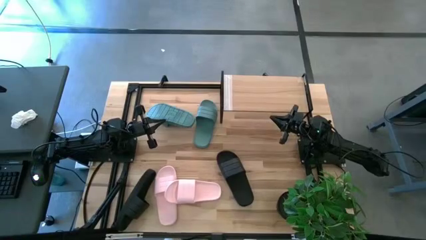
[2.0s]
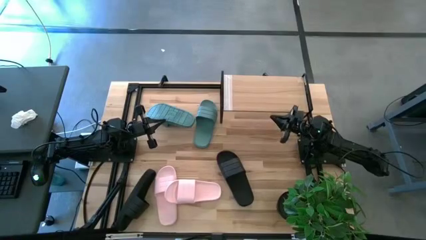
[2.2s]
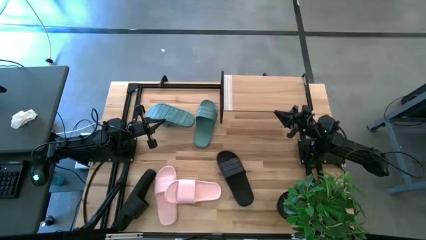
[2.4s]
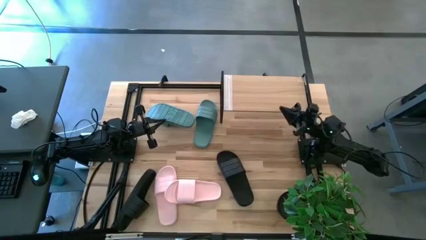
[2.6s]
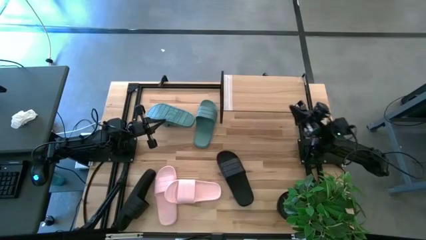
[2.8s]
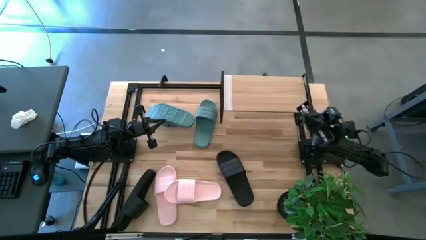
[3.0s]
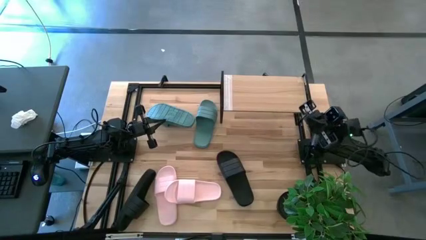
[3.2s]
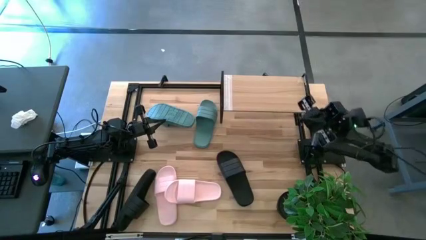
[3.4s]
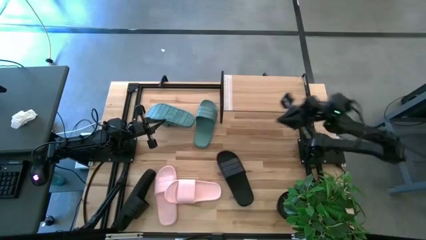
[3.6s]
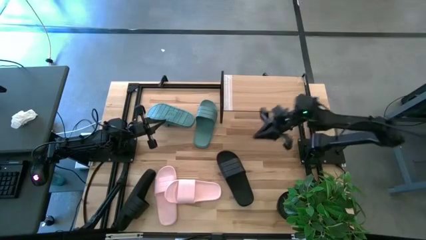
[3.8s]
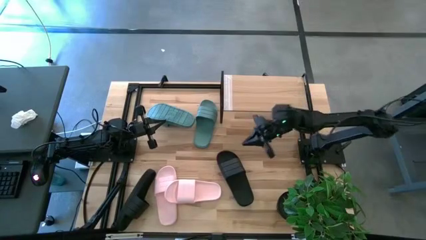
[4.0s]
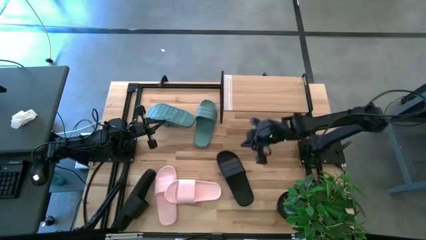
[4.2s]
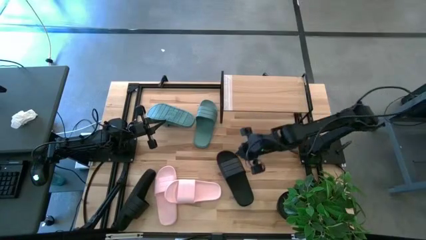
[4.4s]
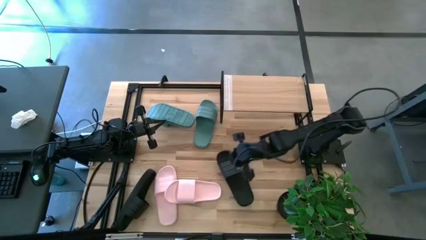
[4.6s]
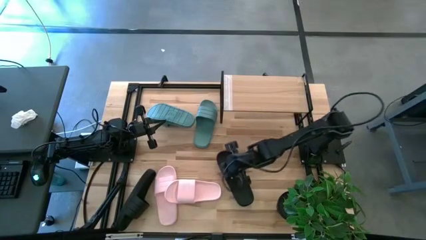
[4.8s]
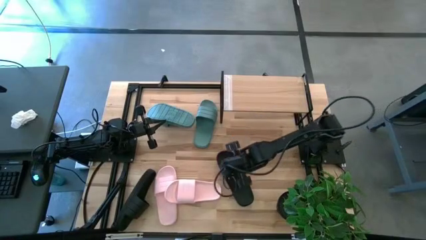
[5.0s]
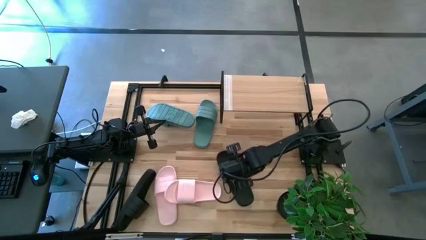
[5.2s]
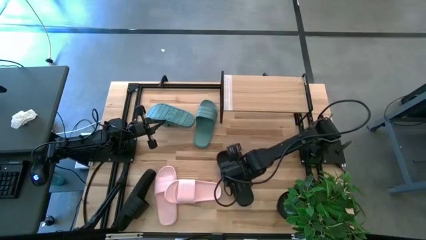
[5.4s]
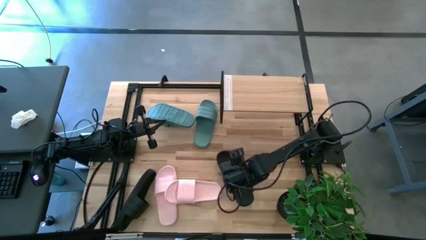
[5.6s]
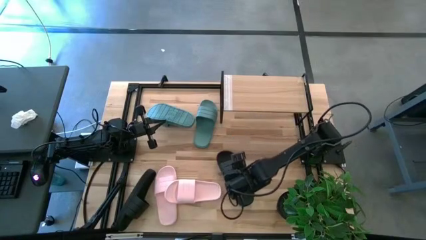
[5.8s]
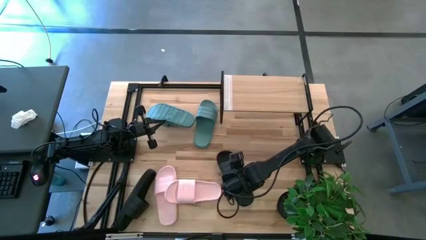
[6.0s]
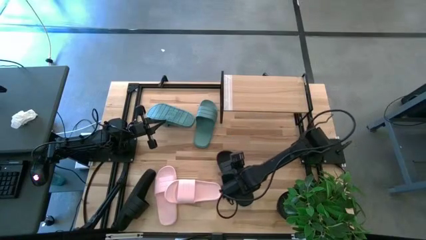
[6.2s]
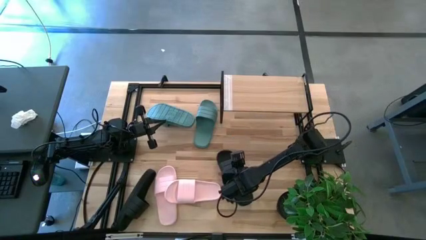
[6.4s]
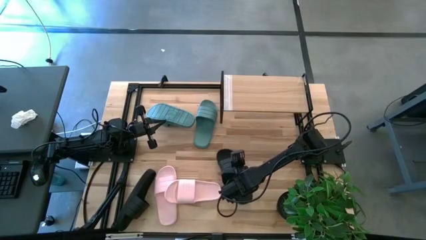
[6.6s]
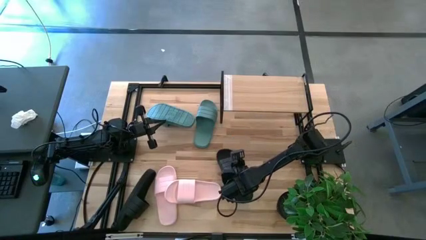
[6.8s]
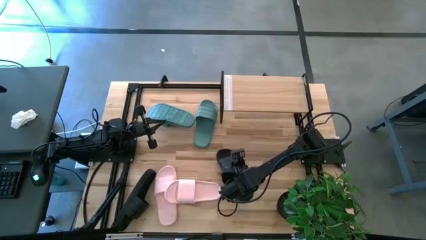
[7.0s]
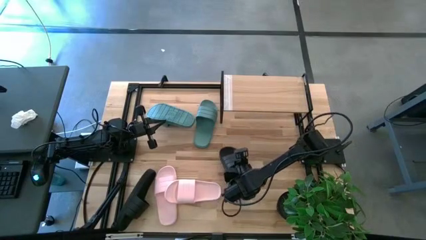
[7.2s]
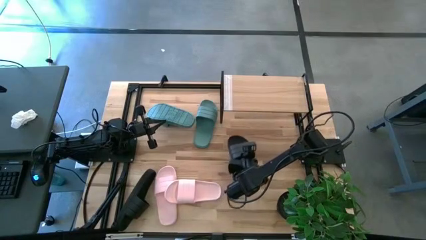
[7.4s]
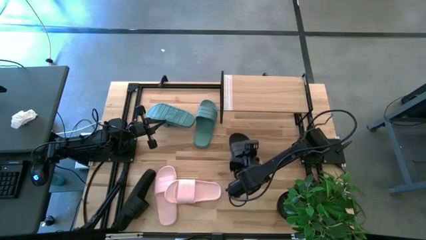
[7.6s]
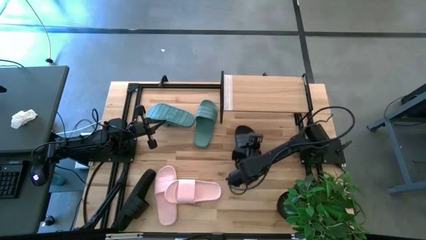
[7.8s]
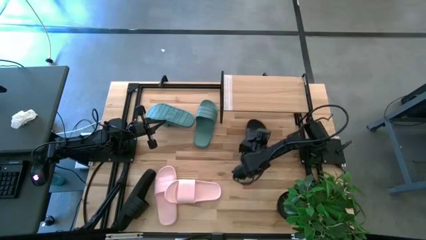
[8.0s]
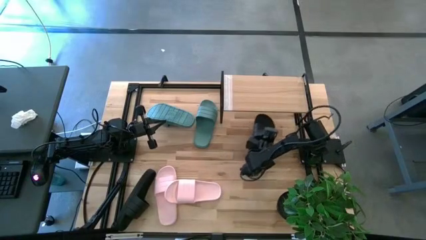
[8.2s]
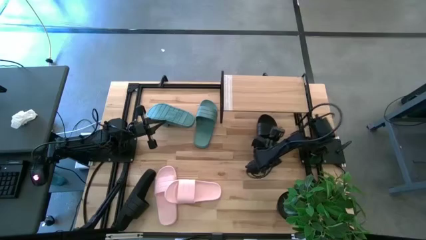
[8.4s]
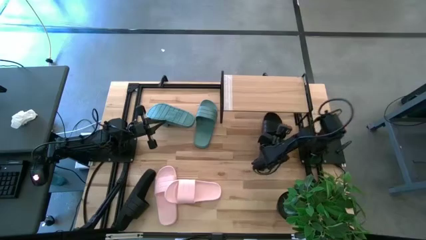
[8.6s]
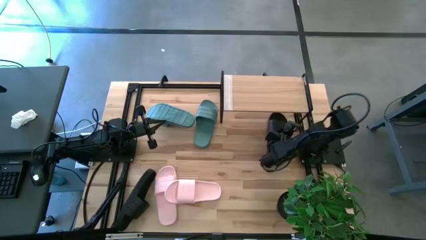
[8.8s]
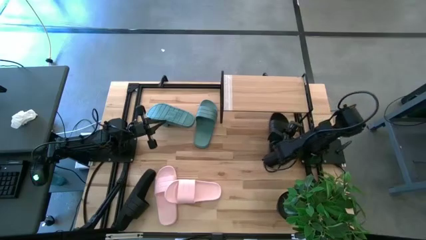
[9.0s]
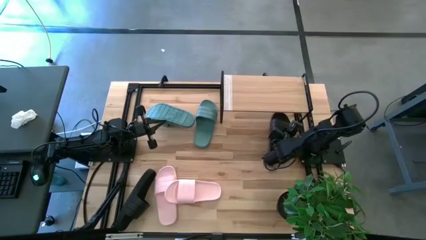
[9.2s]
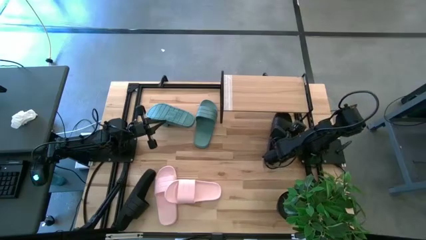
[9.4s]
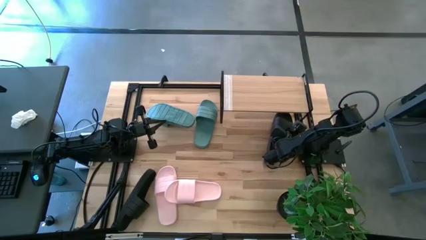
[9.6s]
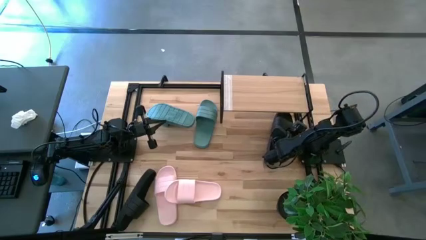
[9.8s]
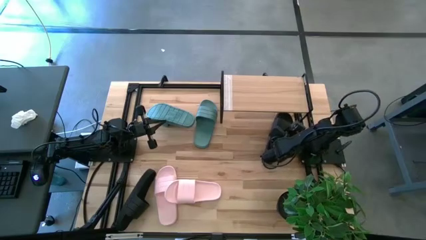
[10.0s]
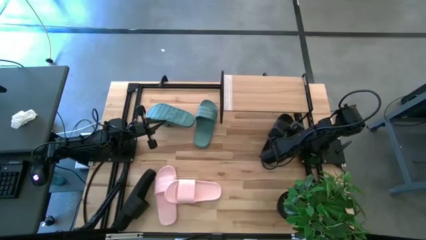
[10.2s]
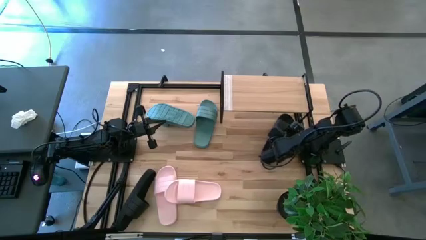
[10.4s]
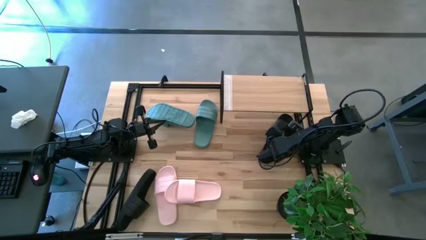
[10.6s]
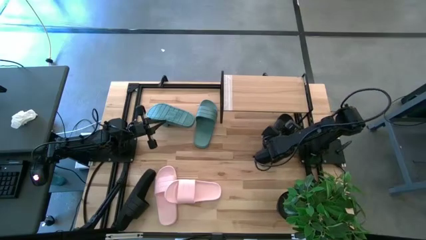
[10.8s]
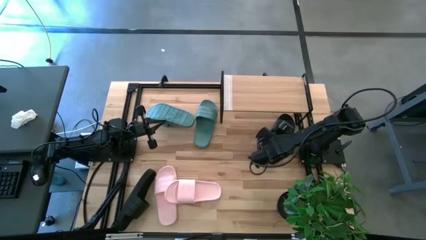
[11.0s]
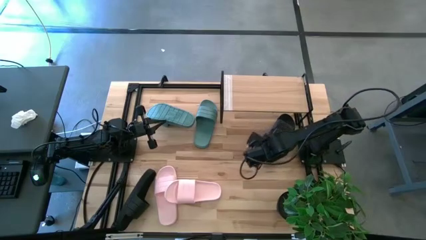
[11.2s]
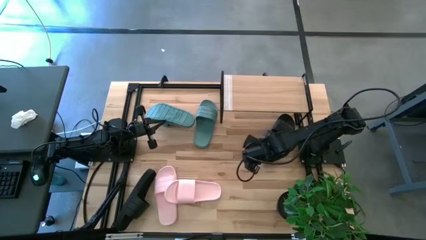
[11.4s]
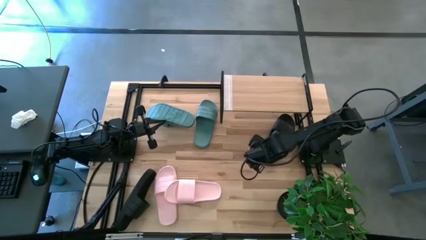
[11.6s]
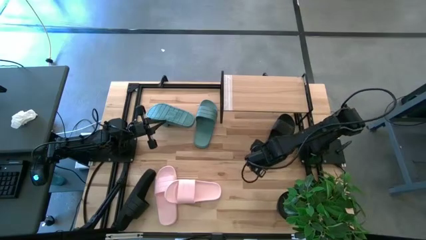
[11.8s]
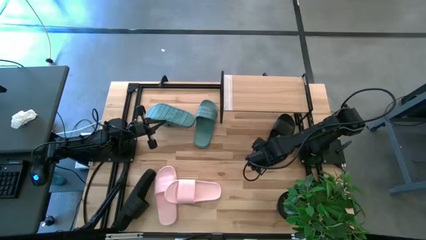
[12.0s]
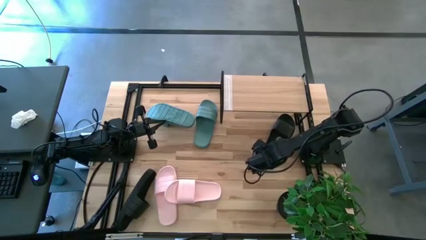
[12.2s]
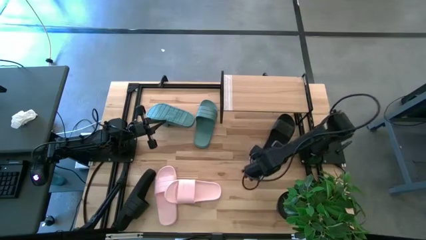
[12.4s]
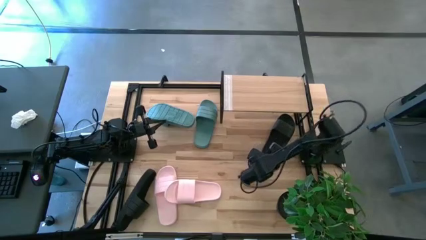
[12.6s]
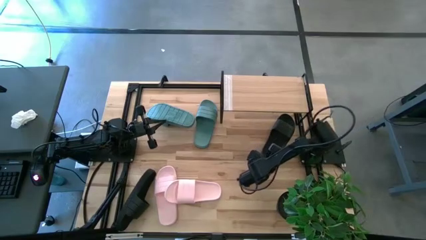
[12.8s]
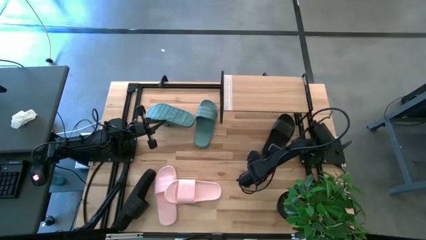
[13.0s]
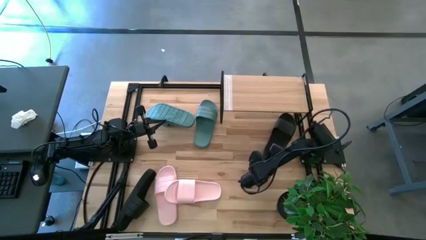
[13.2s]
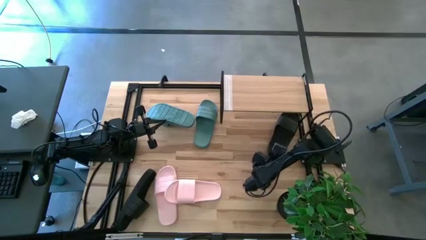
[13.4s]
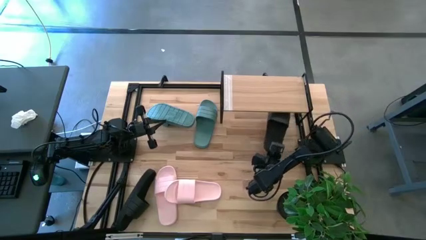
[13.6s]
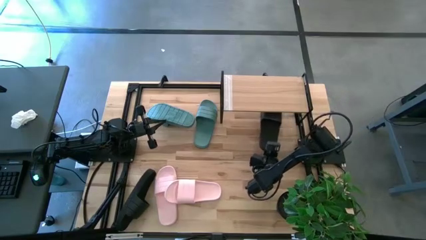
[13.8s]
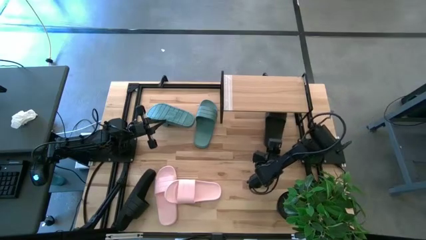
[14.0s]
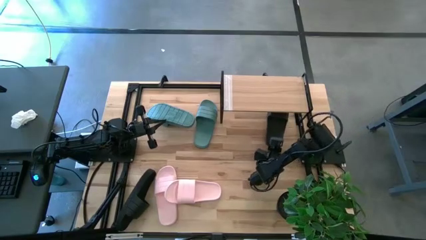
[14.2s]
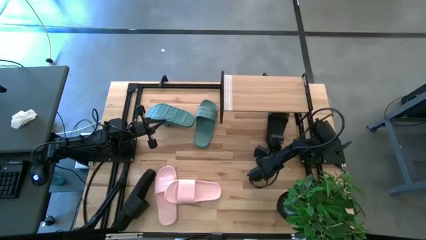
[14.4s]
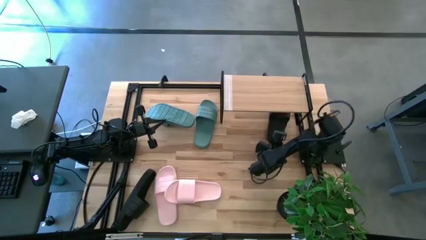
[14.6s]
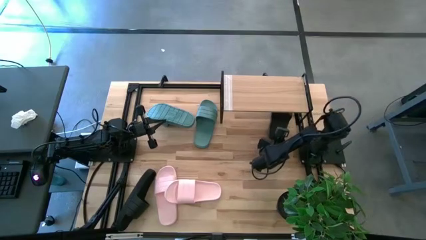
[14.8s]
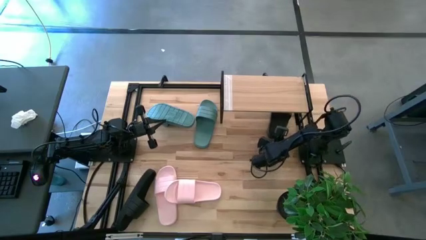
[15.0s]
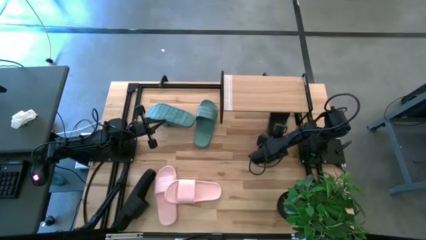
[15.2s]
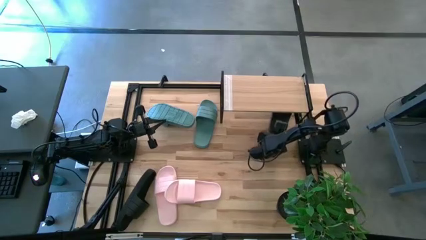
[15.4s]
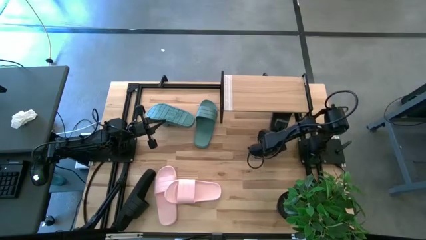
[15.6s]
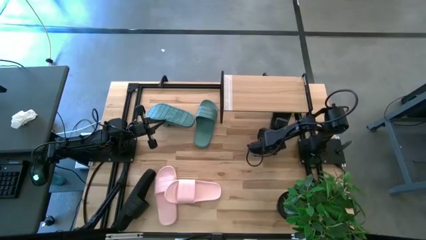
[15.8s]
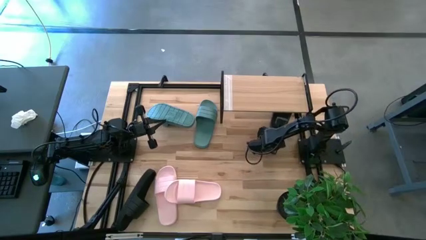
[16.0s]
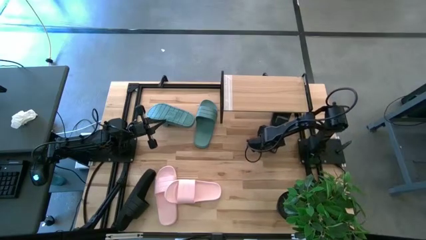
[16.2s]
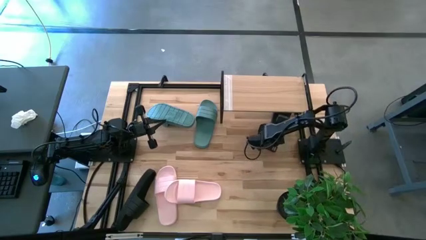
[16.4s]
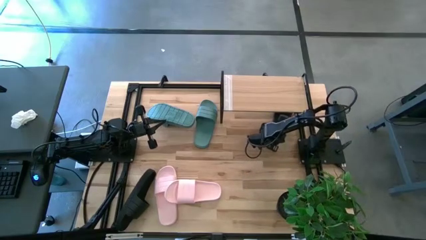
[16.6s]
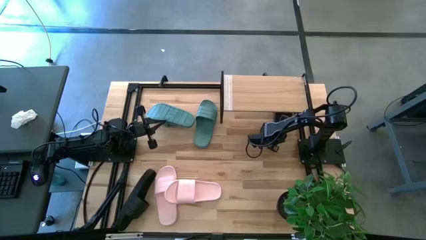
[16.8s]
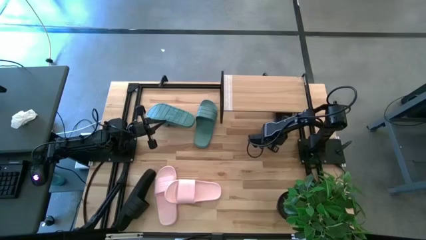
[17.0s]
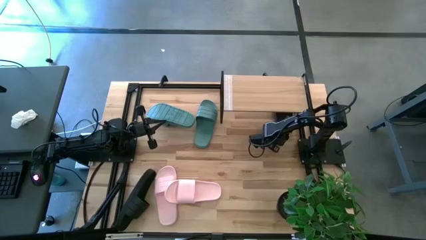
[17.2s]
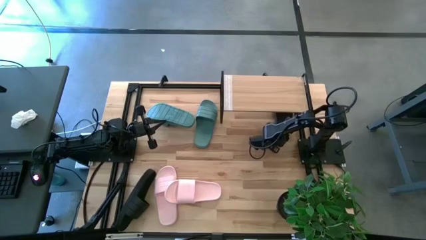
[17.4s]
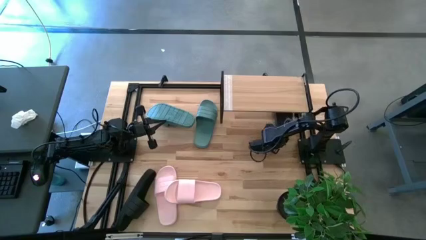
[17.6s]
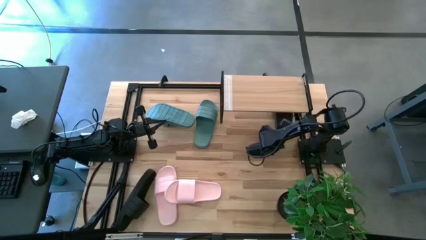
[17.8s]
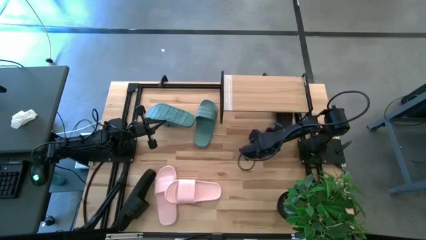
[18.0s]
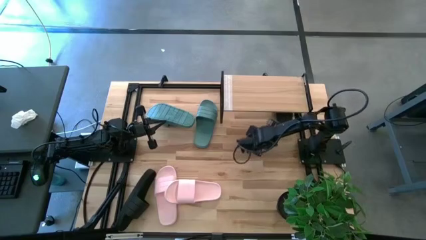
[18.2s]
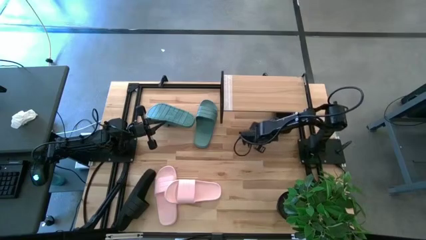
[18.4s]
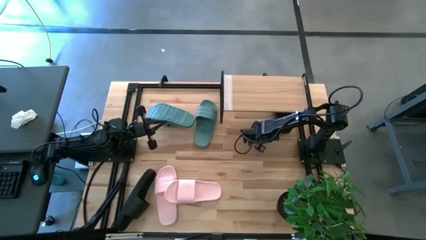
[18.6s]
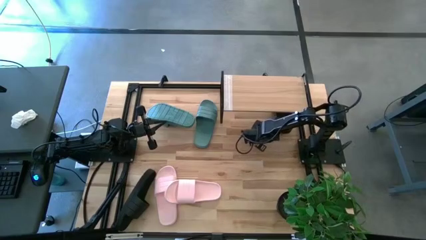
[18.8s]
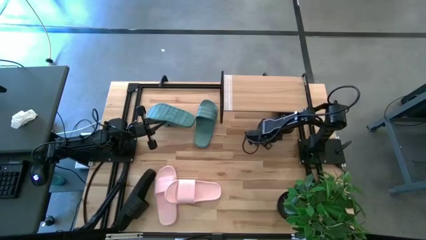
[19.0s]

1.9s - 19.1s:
Task: Pick and place slides into the shelf
Put the right black slipper under the shelf
